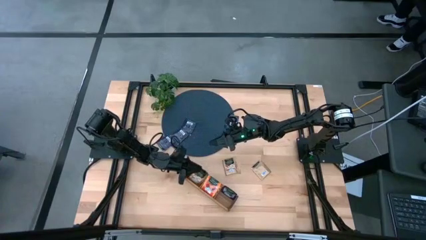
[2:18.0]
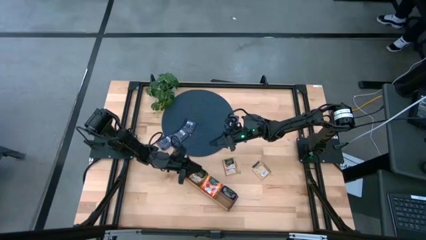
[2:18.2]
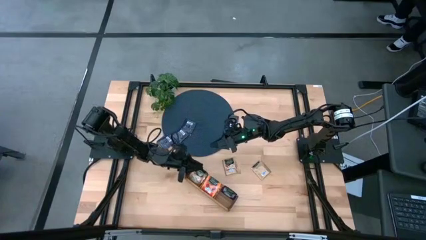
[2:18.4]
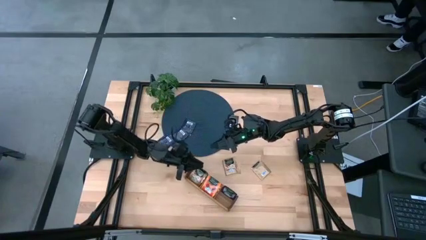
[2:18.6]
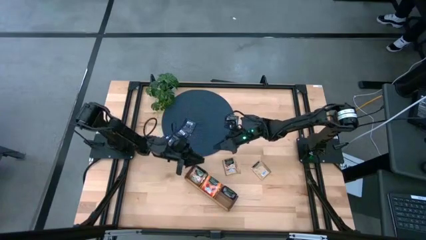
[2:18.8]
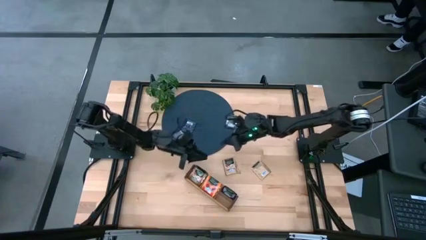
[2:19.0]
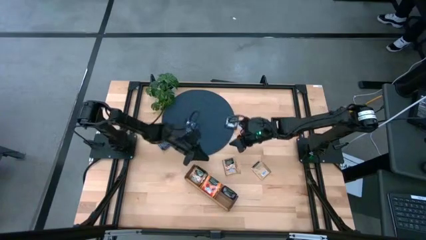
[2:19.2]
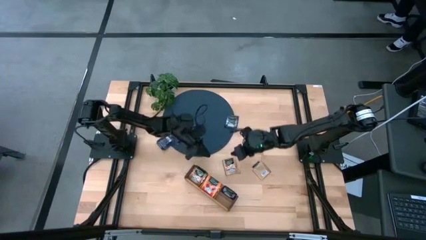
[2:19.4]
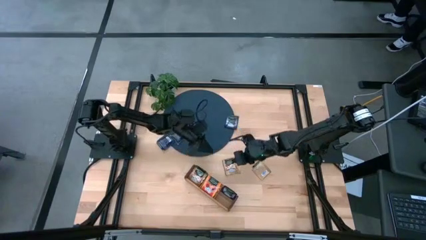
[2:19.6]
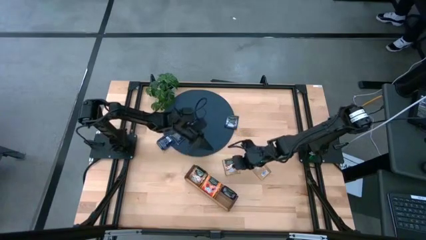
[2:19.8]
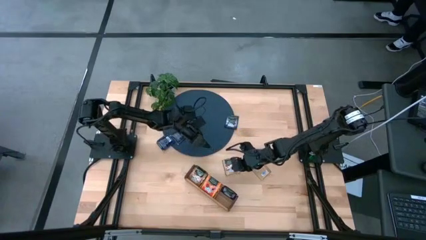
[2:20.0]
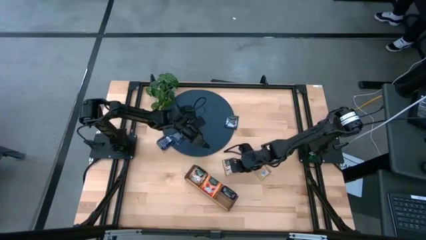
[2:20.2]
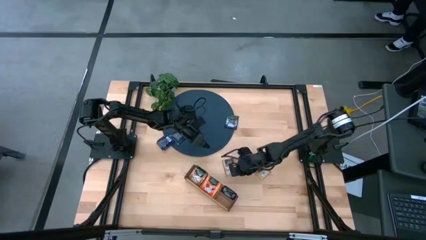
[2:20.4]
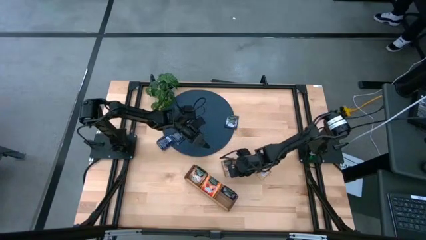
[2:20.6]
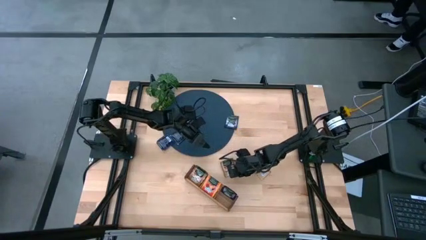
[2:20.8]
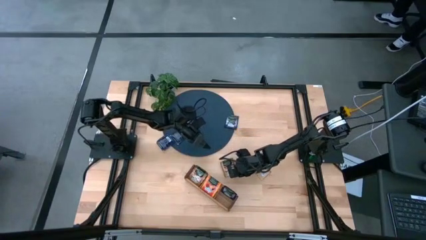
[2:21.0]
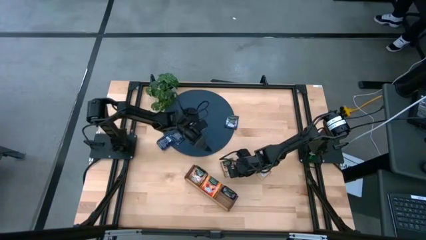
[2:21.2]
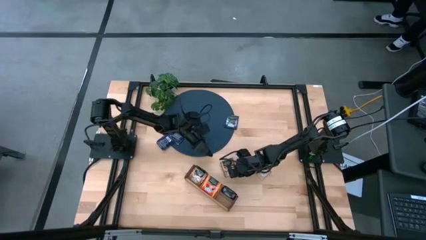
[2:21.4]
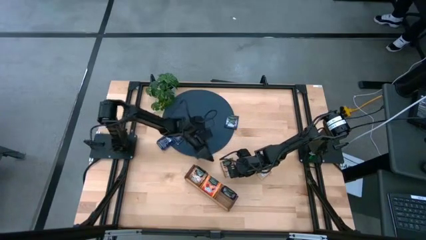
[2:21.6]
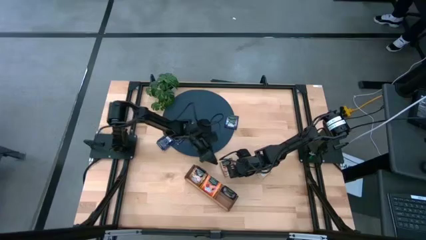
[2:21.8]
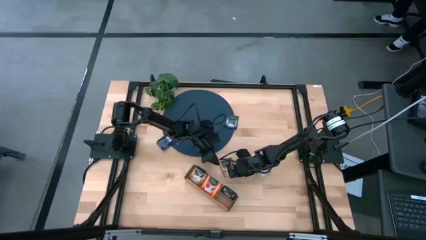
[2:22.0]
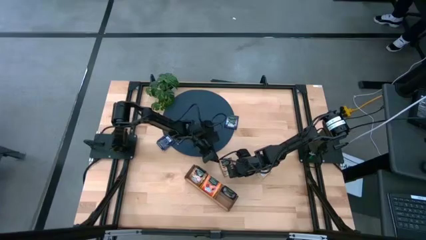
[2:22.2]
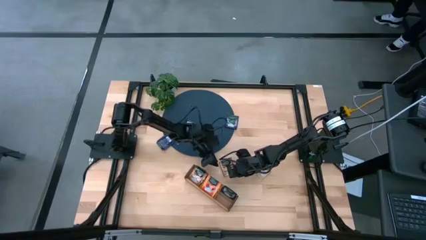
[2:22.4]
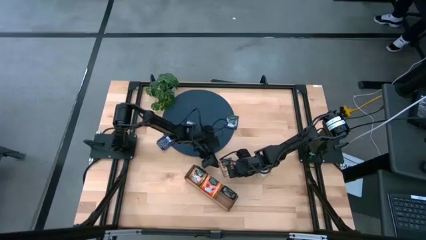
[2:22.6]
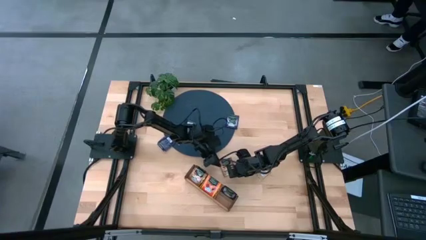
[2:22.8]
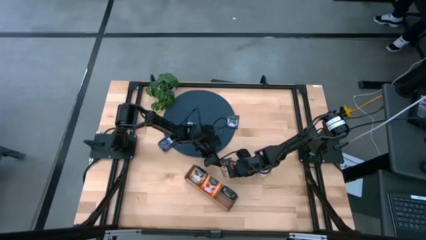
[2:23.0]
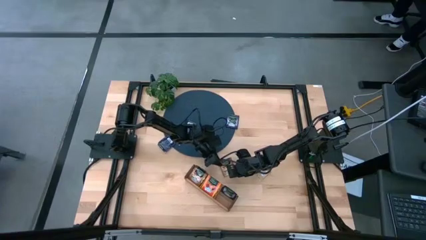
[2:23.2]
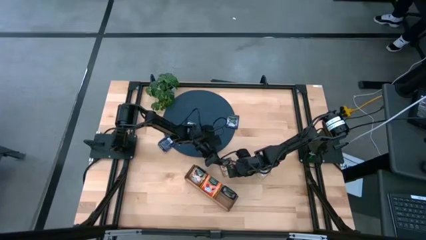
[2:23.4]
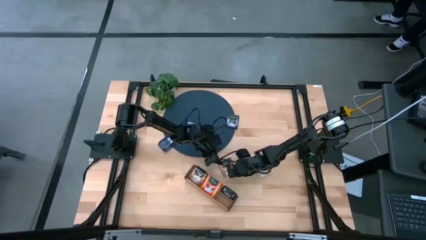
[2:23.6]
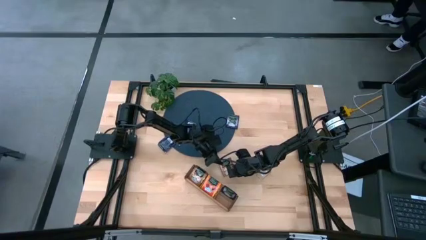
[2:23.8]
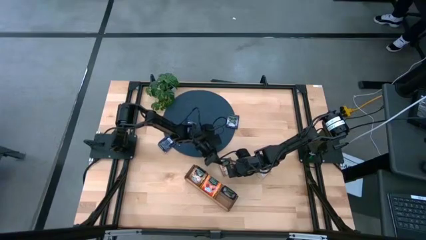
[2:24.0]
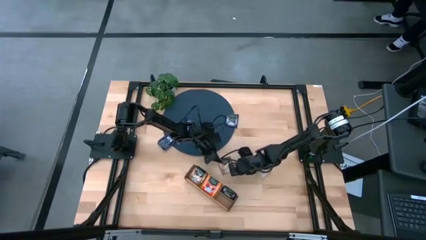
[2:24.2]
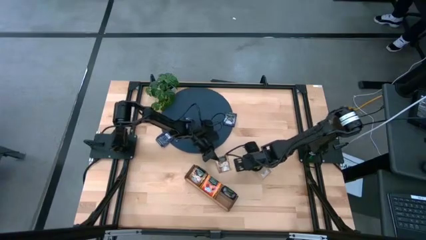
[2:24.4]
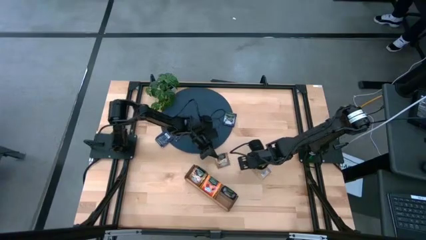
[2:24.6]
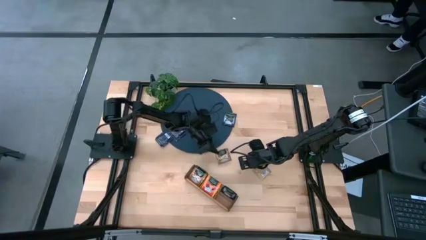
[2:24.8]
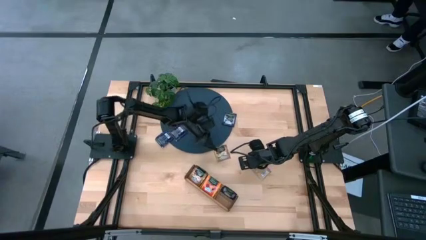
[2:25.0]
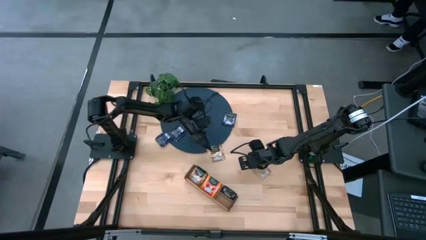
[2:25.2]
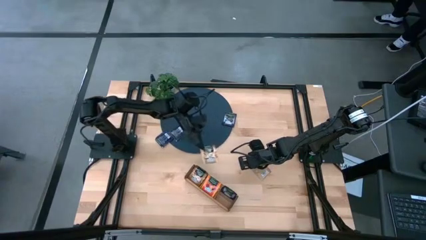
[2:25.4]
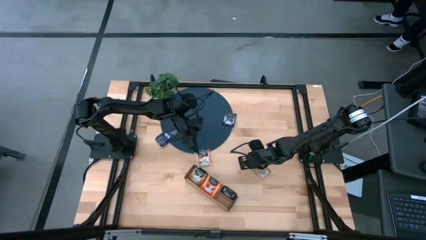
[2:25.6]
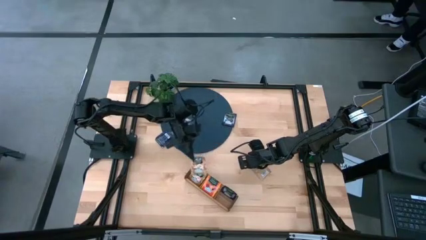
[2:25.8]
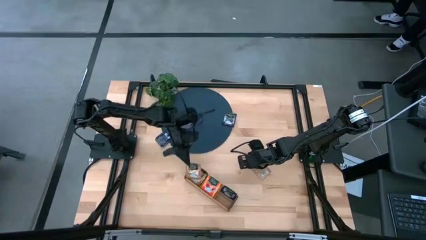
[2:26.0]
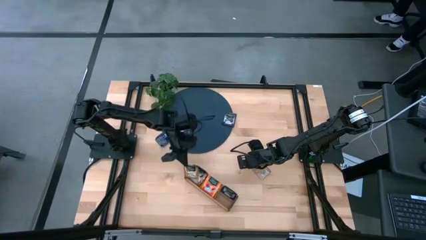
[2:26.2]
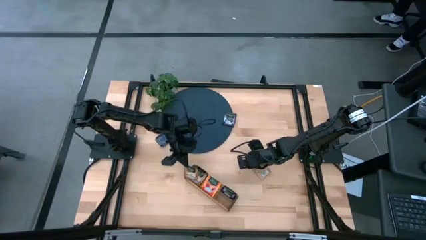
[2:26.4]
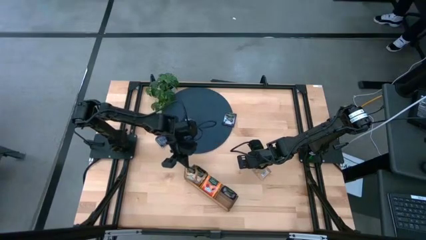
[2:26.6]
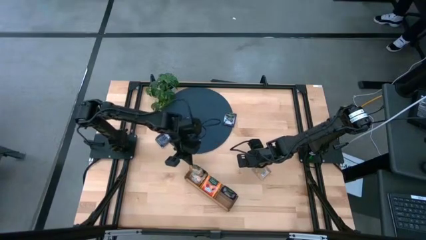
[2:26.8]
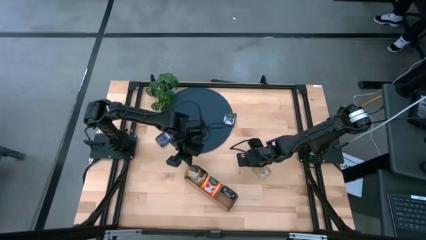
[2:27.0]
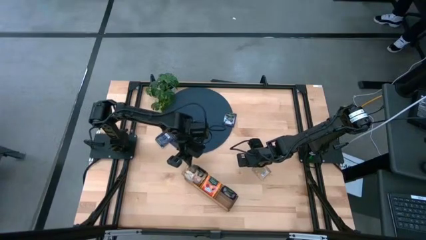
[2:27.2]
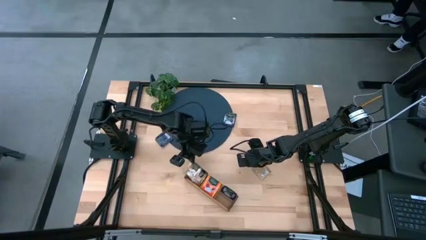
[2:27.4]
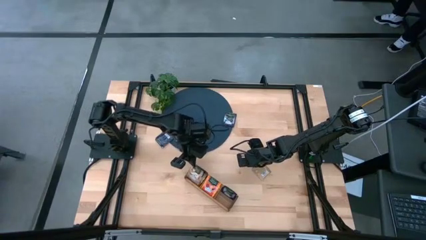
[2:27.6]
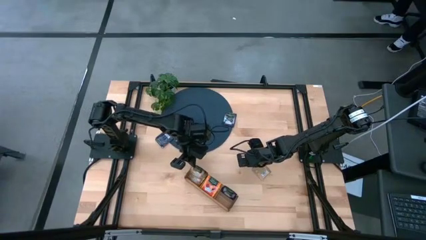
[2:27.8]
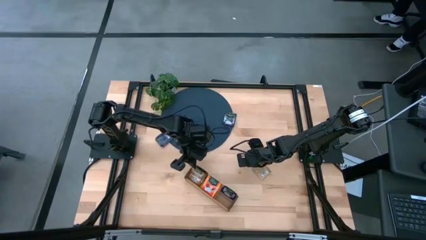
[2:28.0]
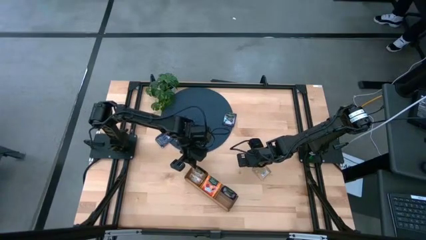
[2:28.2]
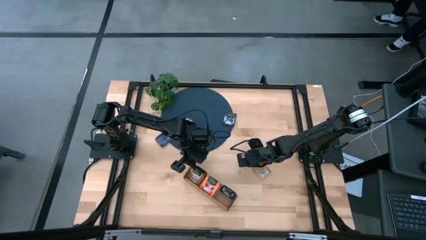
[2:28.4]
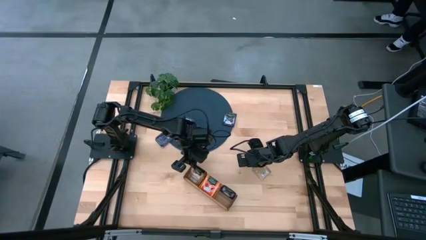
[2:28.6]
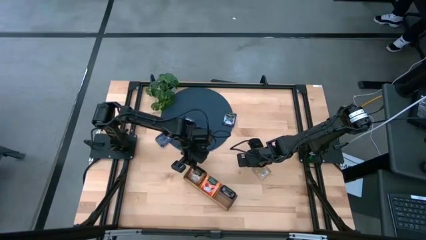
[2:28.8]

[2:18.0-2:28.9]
Task: Pick & Place Tea
Put the brown tea bag into the left section of the wooden organizer

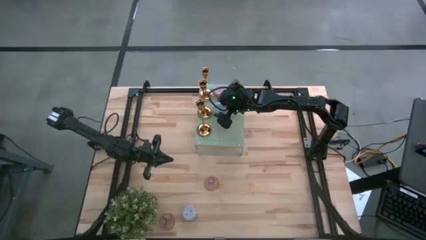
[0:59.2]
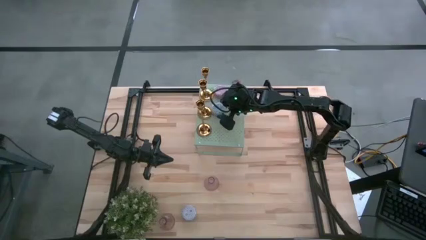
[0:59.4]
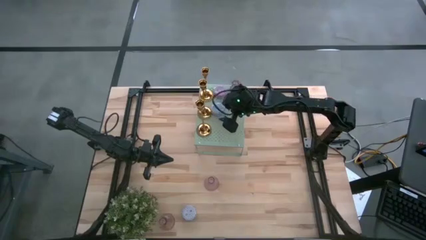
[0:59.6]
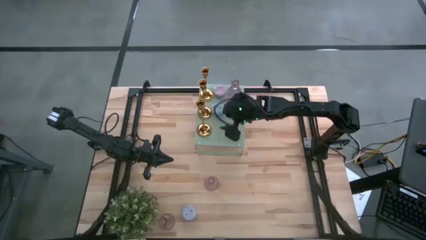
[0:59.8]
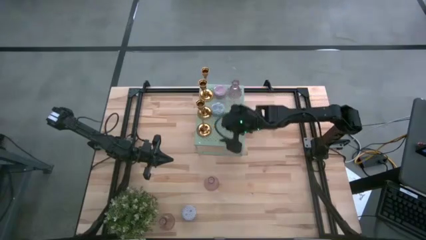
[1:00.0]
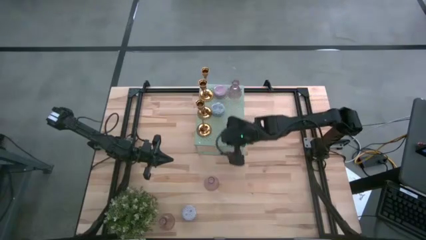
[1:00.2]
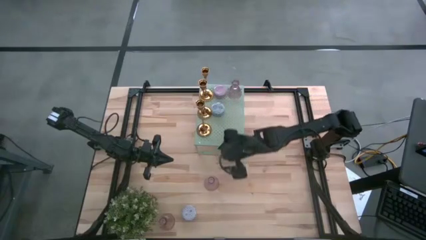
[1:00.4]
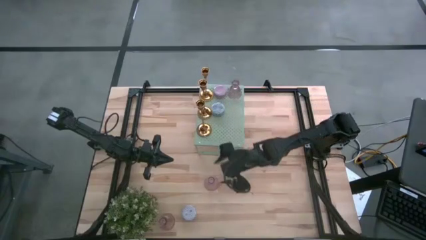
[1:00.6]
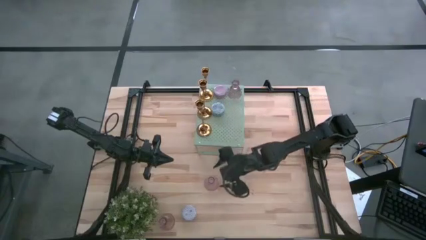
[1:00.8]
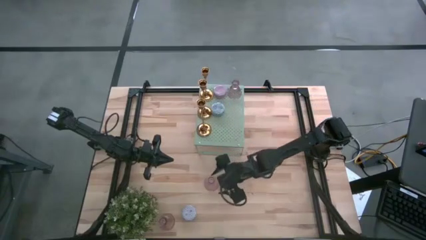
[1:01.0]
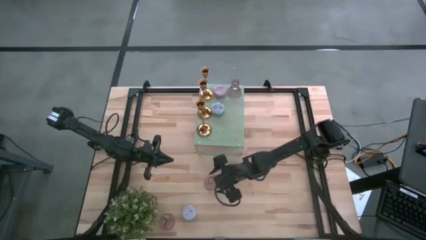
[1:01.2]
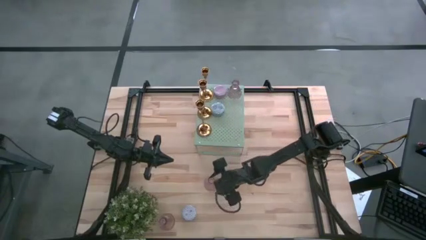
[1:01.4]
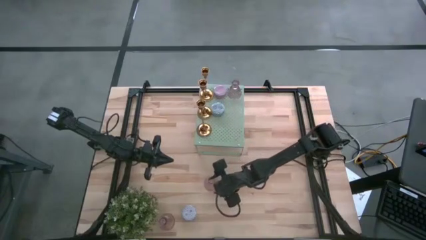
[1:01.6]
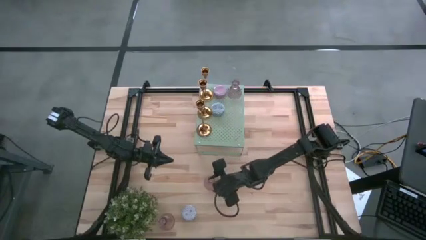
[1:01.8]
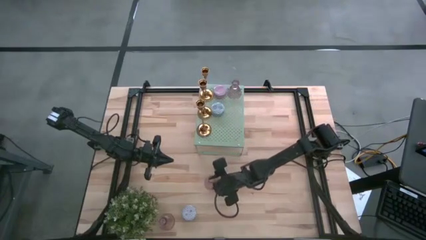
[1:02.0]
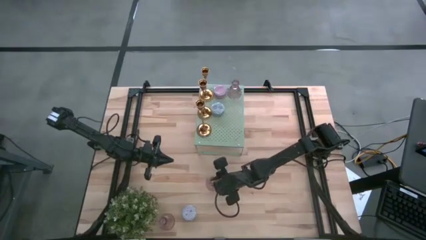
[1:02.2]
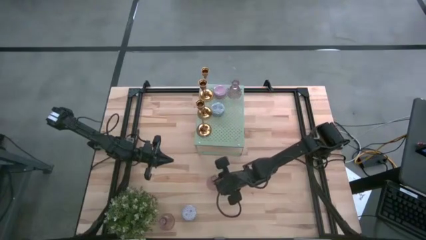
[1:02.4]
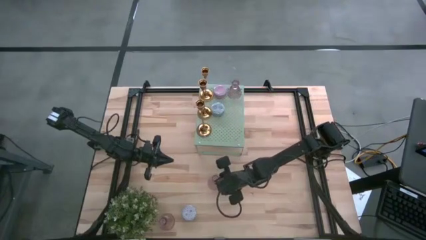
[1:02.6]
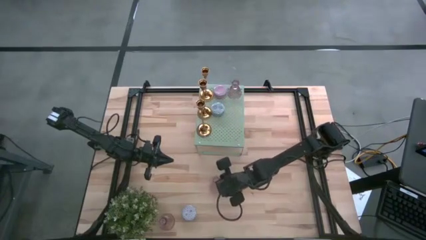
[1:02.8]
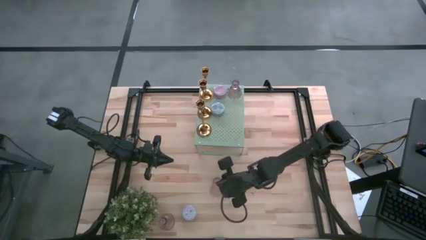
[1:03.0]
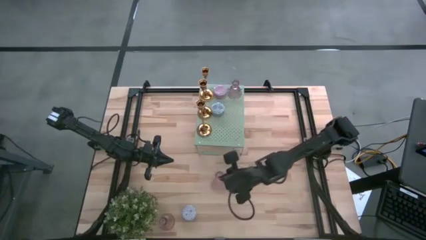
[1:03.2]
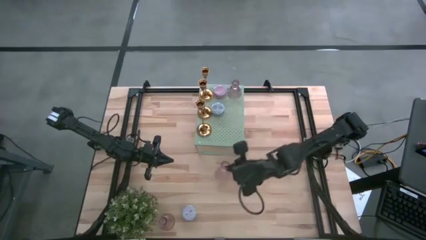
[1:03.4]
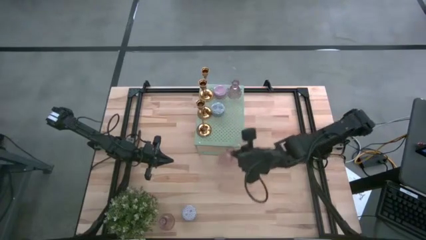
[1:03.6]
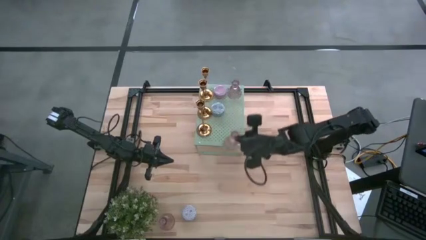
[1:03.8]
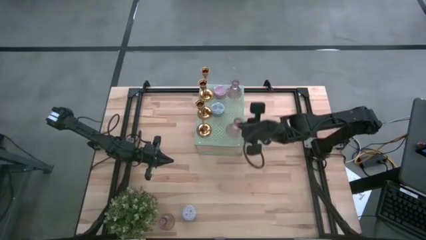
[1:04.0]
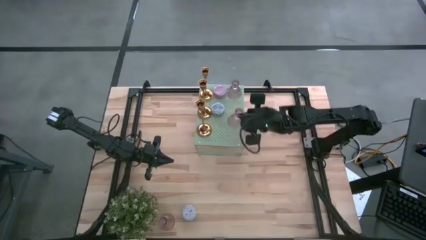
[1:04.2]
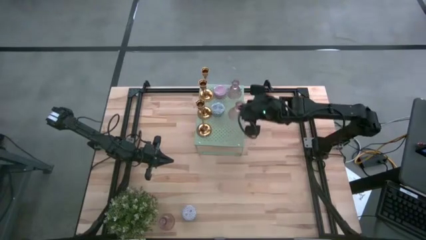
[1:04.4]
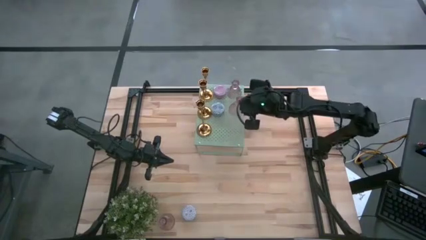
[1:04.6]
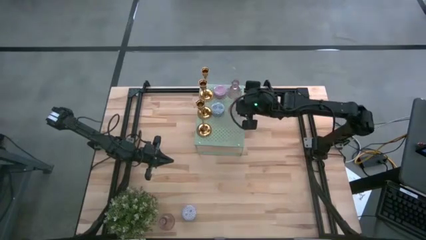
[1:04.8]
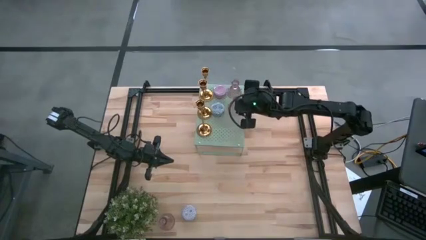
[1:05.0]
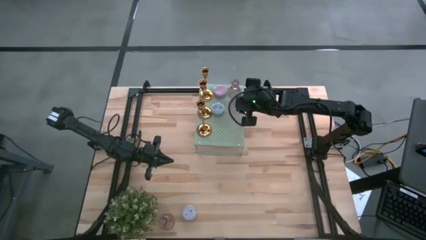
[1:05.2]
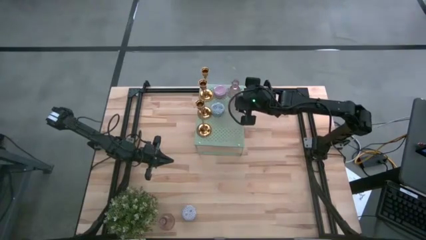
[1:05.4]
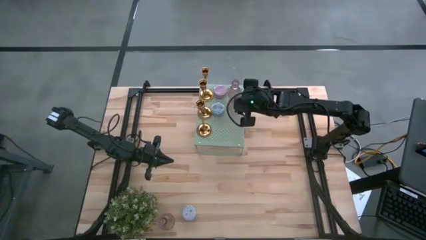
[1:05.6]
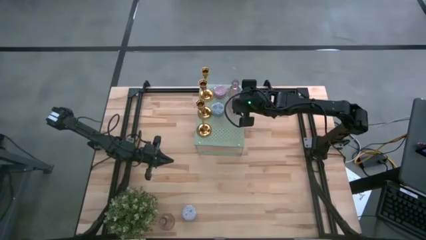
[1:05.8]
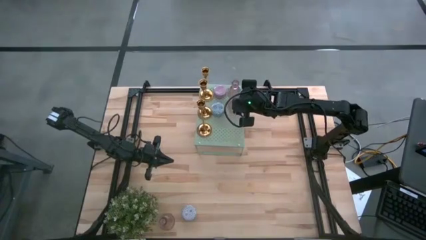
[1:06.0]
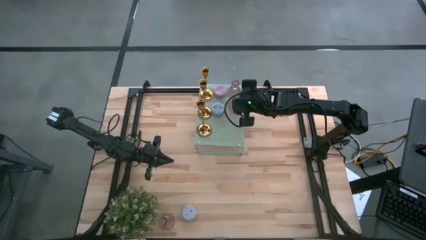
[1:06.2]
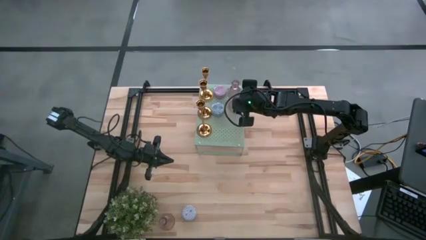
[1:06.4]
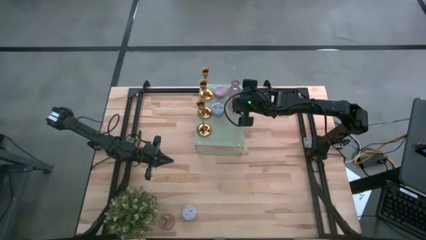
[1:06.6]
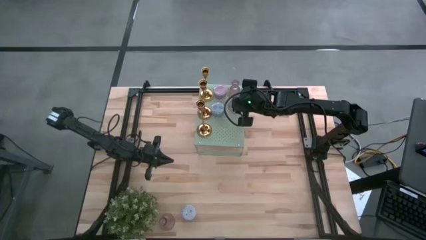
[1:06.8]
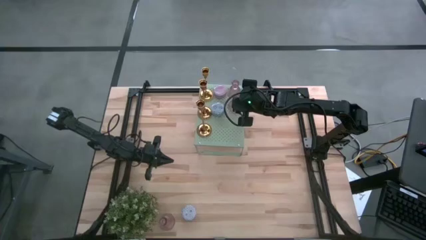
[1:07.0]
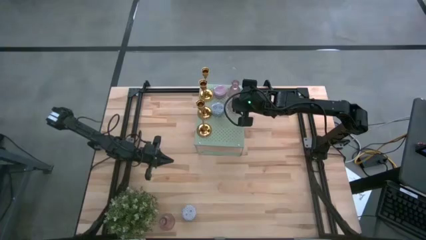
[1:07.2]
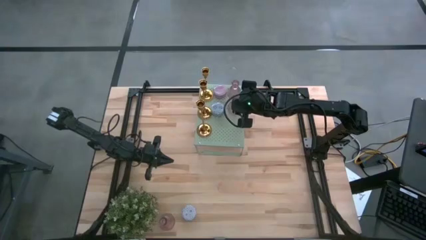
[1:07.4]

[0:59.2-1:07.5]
Task: Pick & Place candle stick holders
Put the top pink glass candle holder on the shelf
